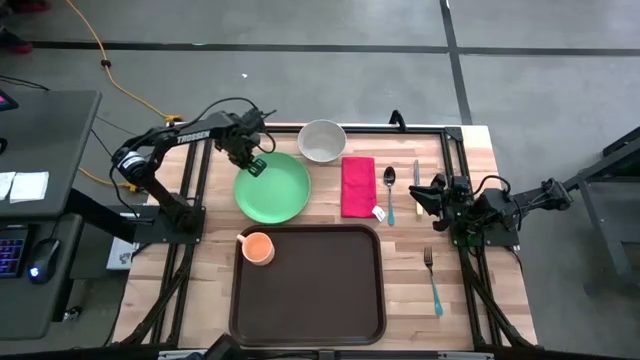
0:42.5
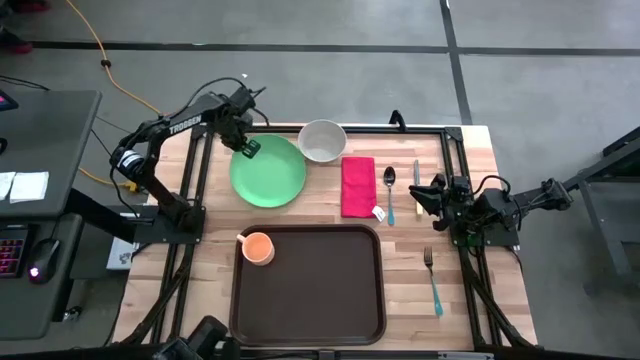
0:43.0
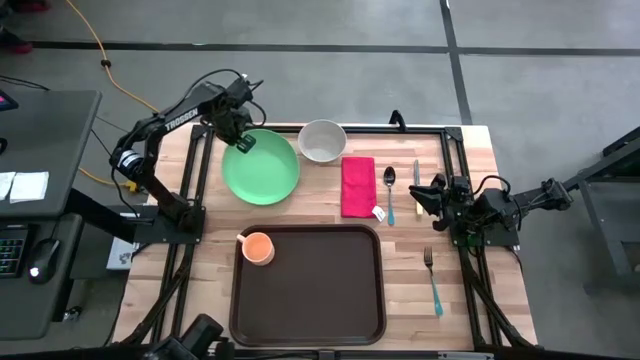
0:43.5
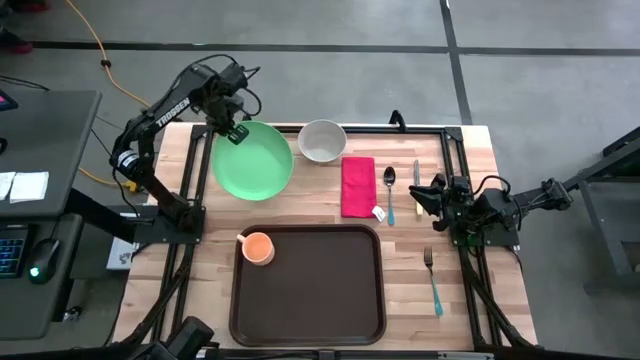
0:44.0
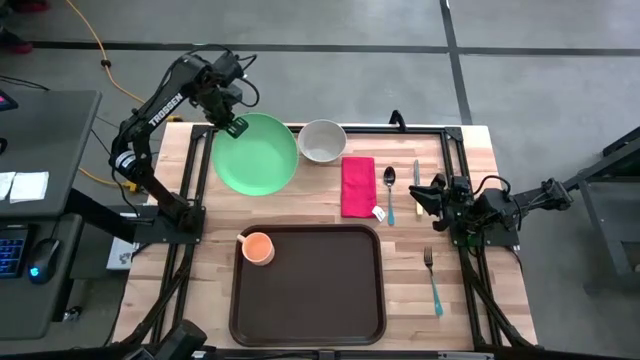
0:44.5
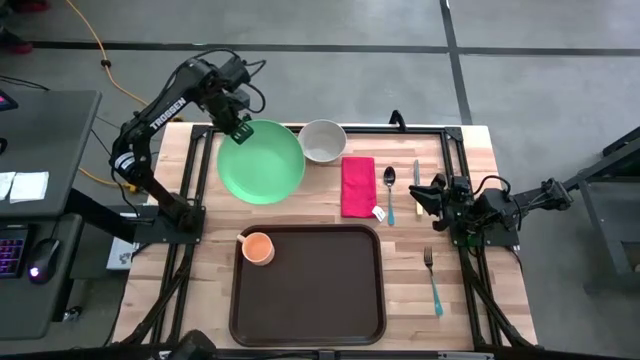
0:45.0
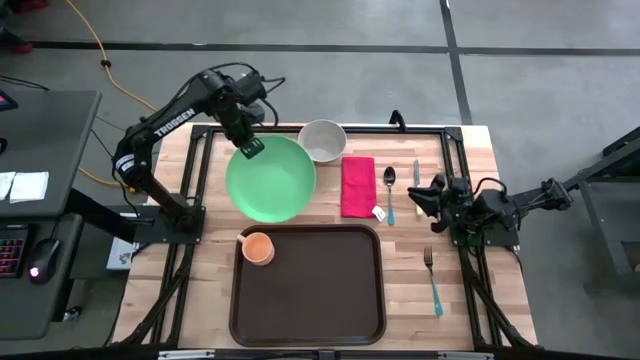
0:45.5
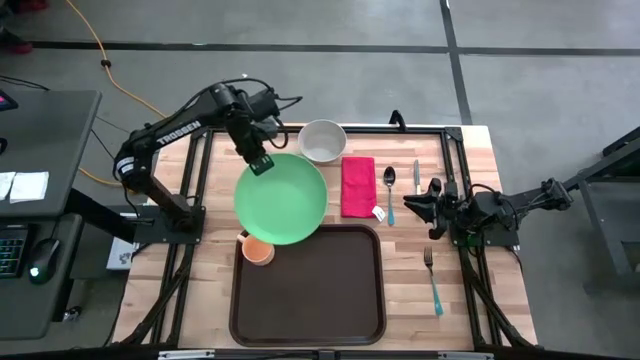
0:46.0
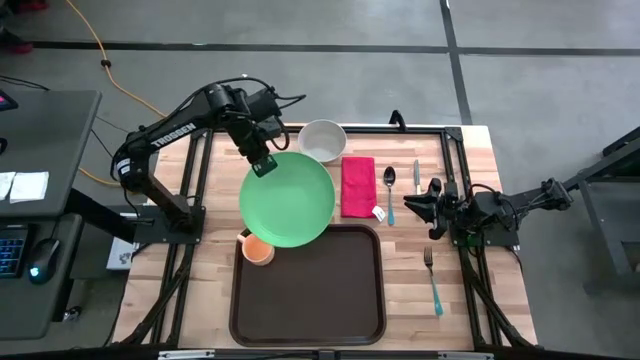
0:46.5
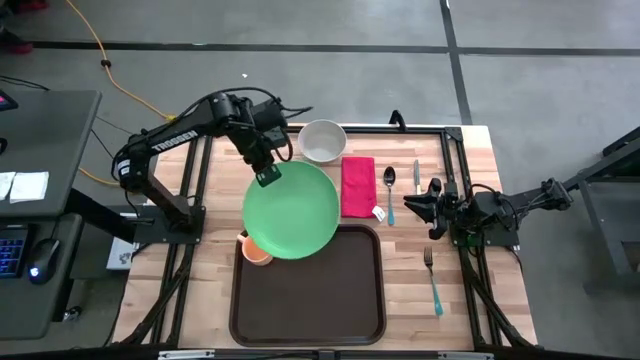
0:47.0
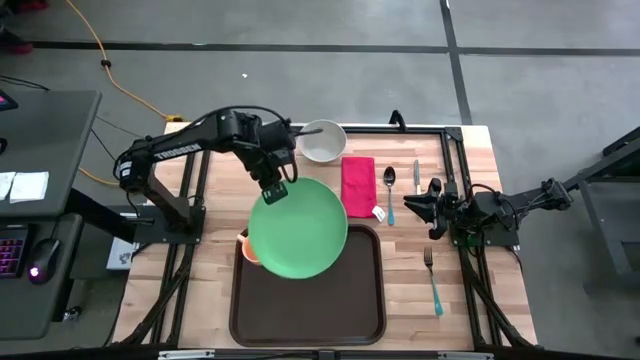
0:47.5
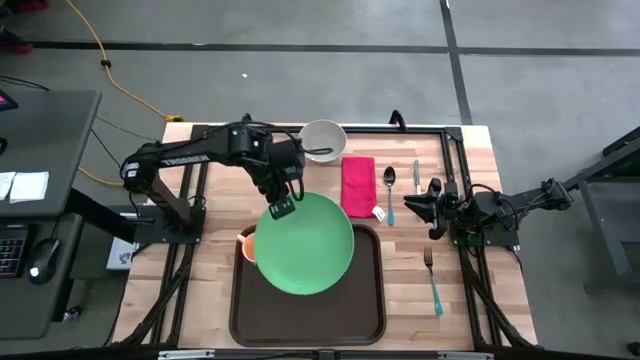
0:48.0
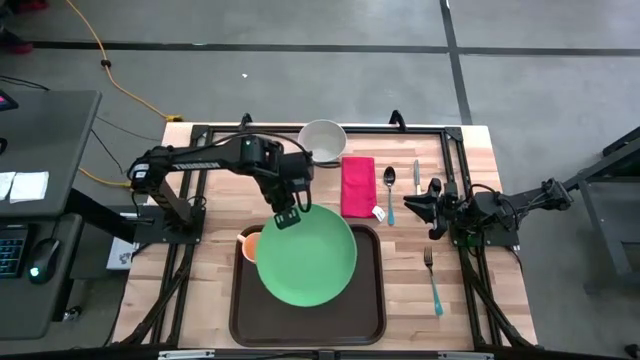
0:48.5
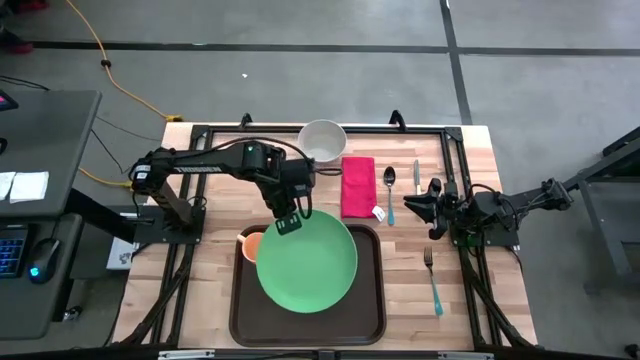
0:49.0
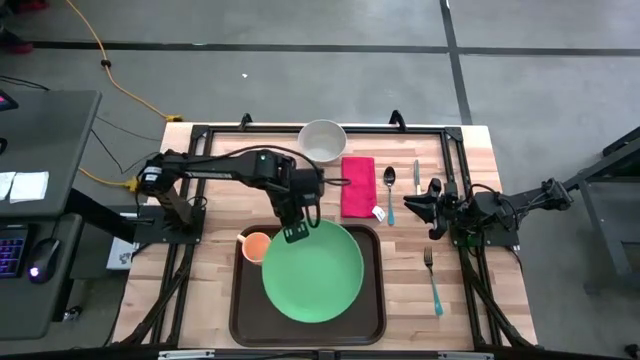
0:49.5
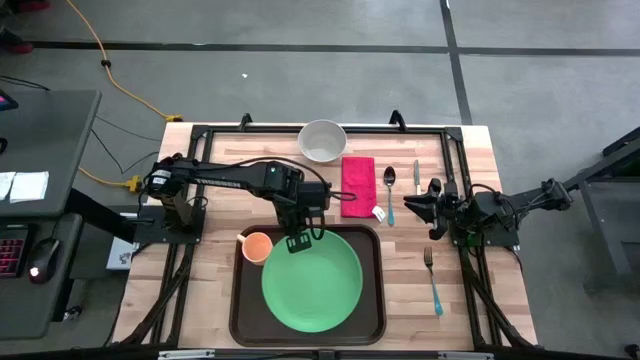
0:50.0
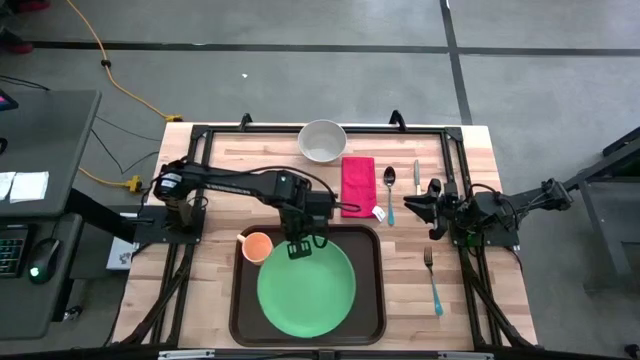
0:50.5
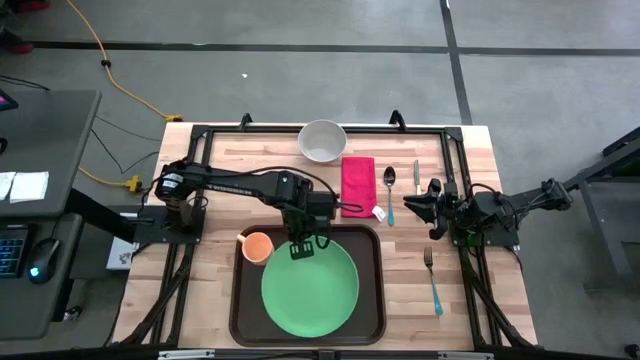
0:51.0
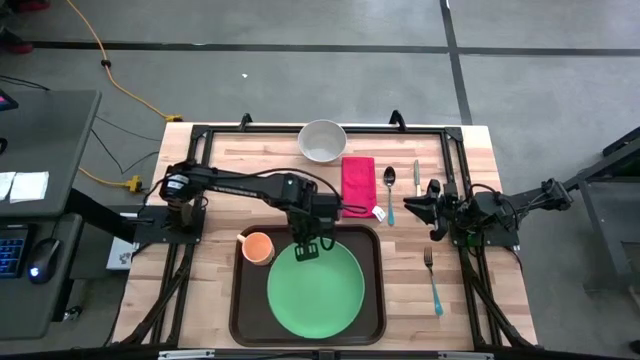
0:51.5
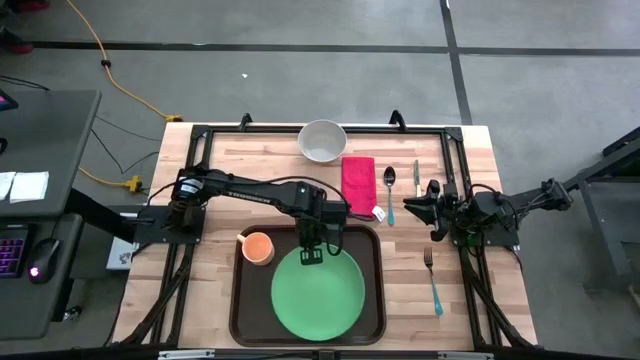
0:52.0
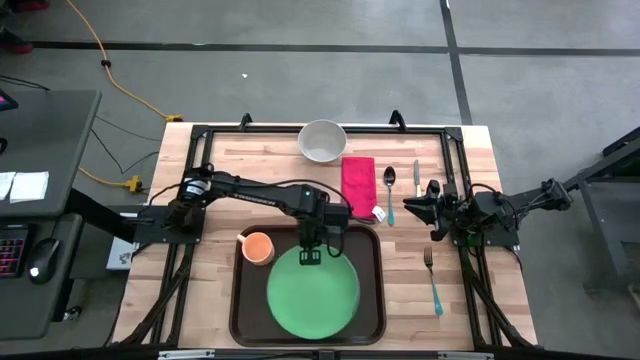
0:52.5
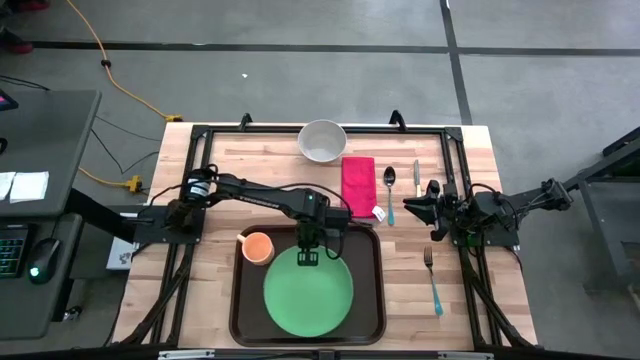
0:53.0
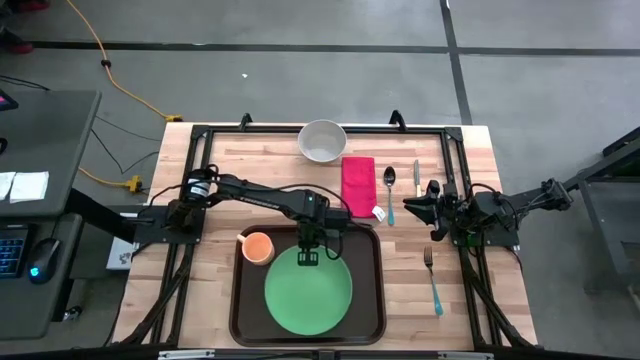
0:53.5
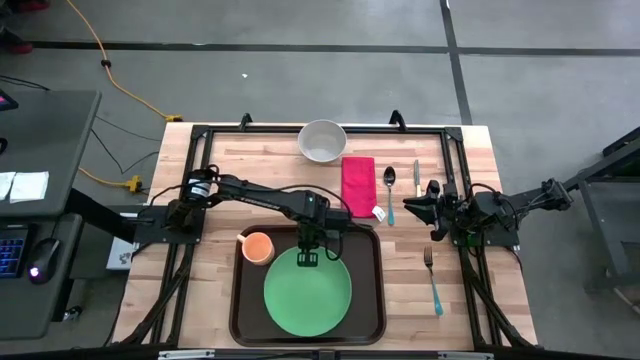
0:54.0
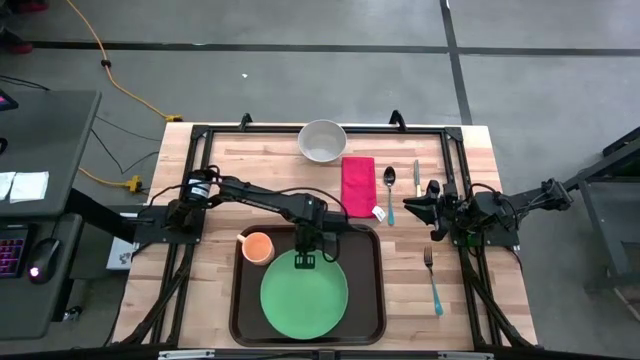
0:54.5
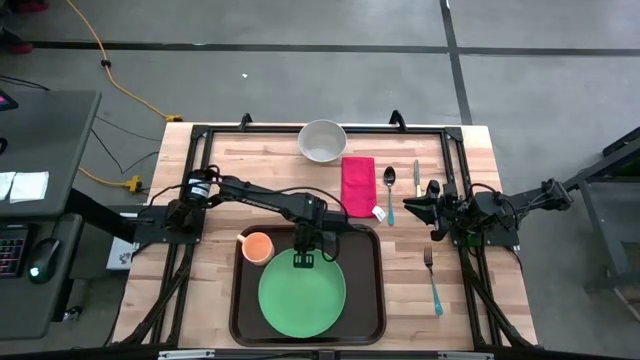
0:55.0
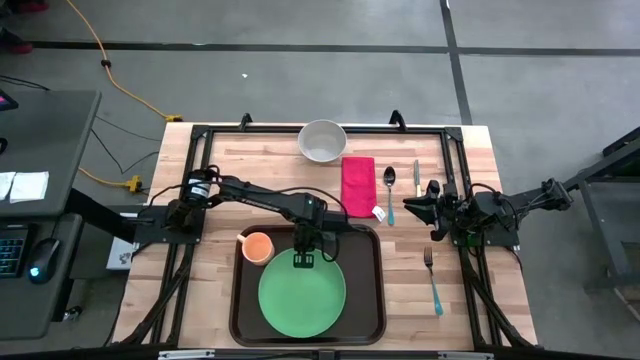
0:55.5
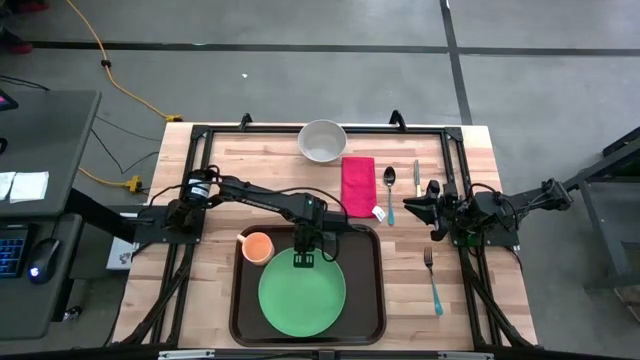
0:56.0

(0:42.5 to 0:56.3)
Task: Set up tray
Put the green plate on the brown serving tray

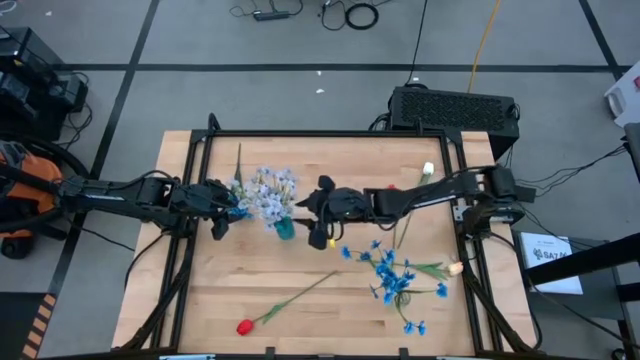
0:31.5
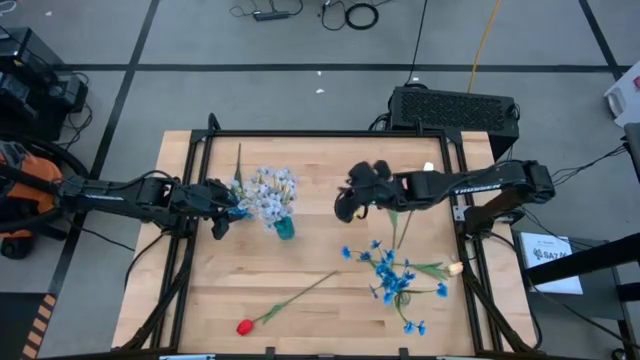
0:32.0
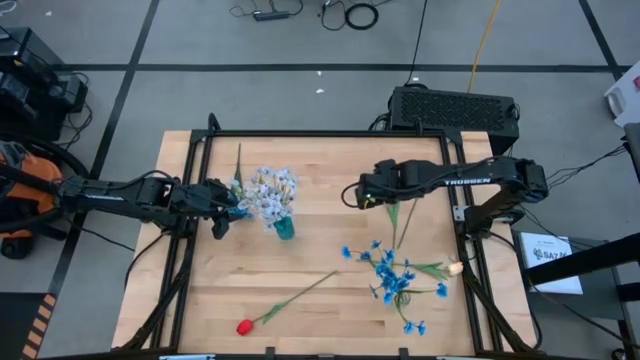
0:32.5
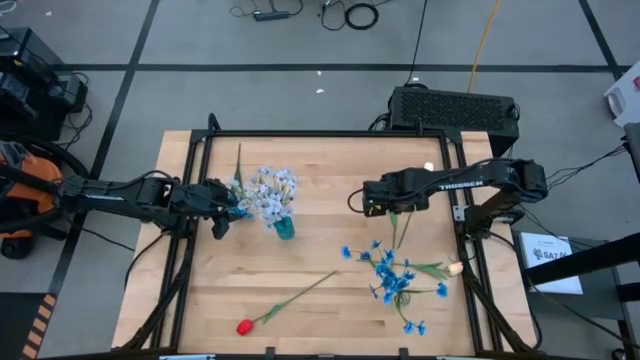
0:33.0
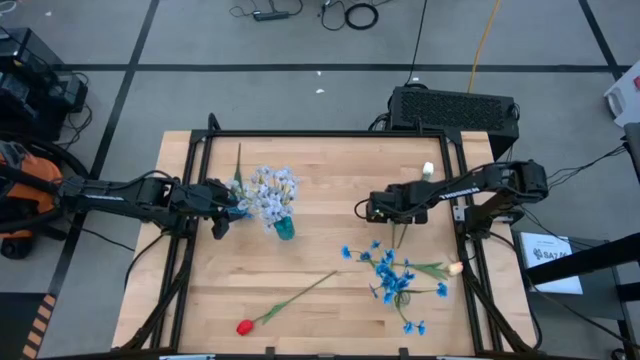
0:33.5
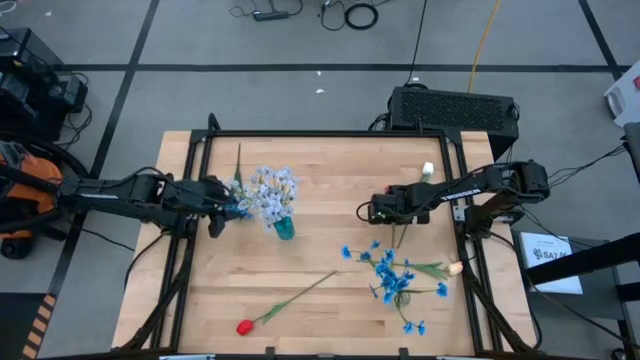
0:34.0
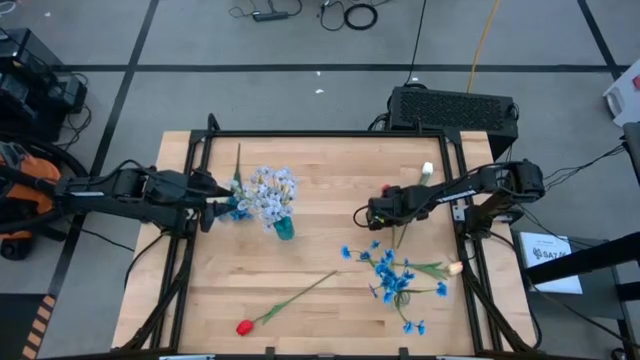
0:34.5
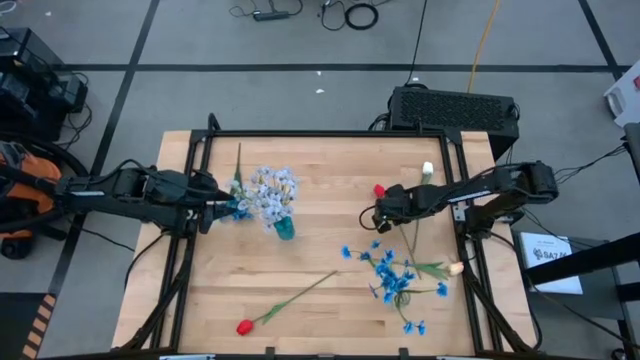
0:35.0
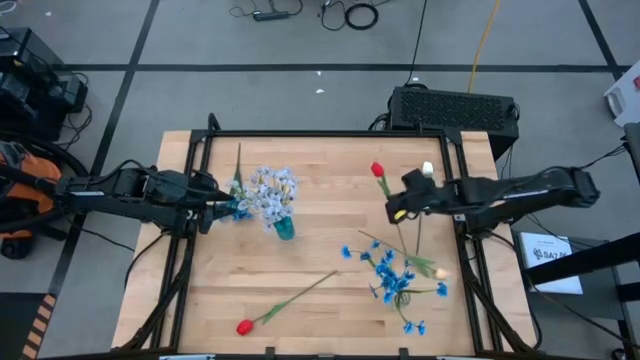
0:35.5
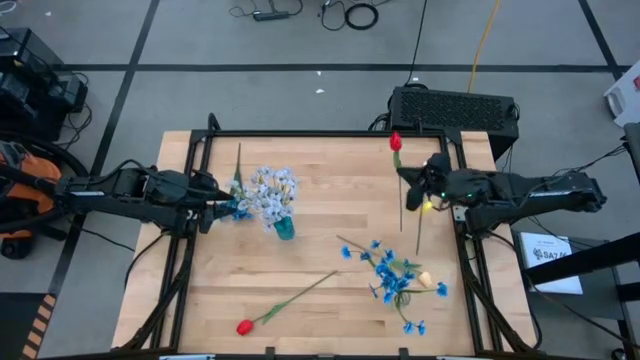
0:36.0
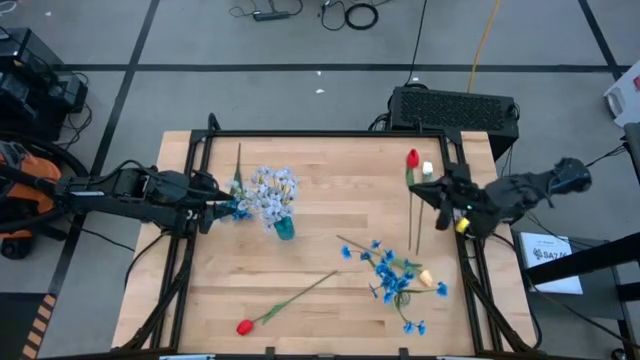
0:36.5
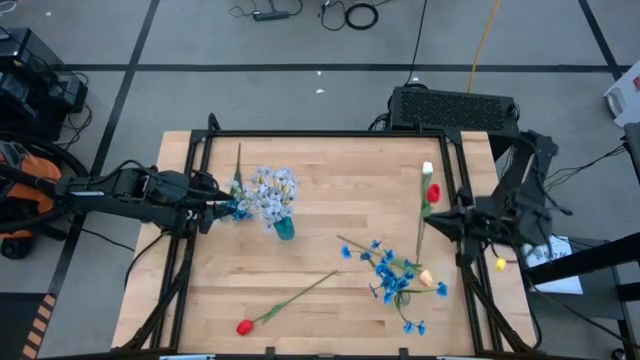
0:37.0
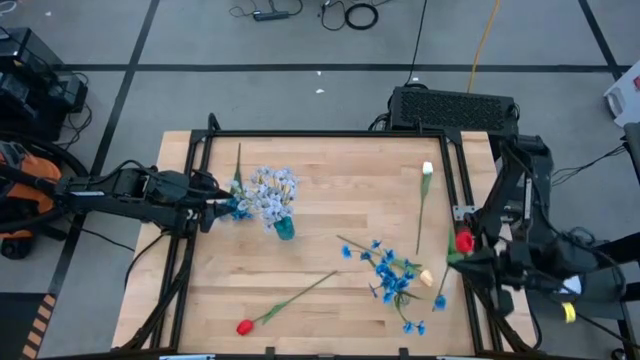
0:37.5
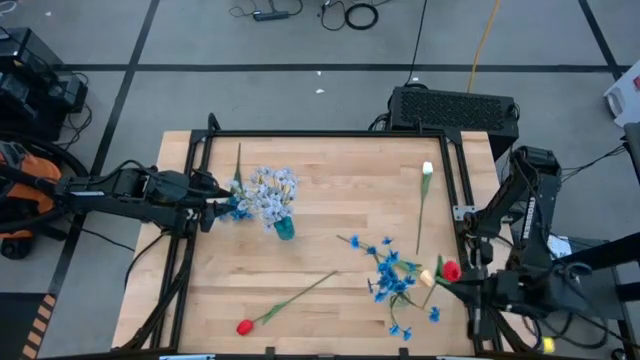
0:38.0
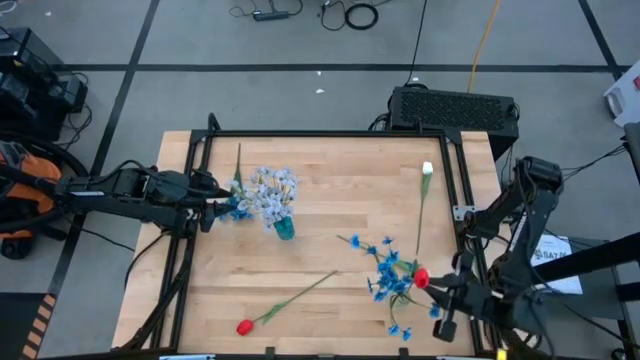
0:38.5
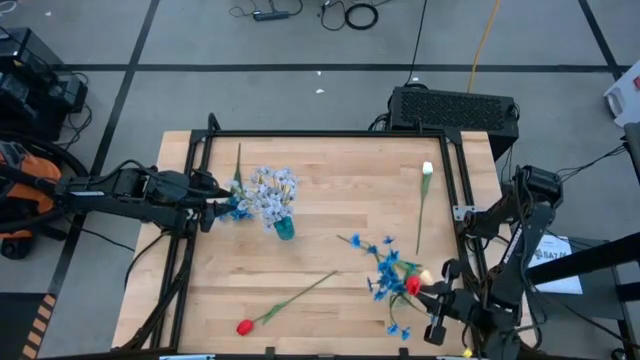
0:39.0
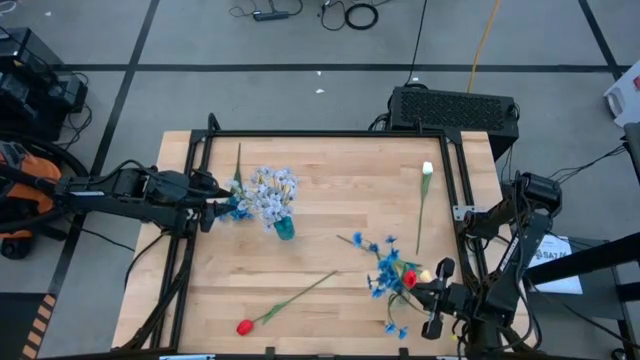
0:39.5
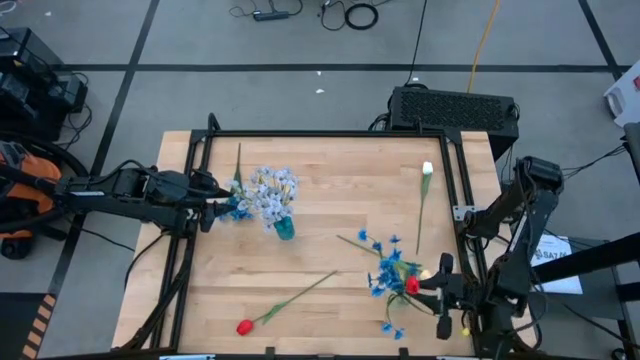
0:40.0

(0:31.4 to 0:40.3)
Task: Sort flowers into vase by color
Put the top red tulip into the transparent vase
